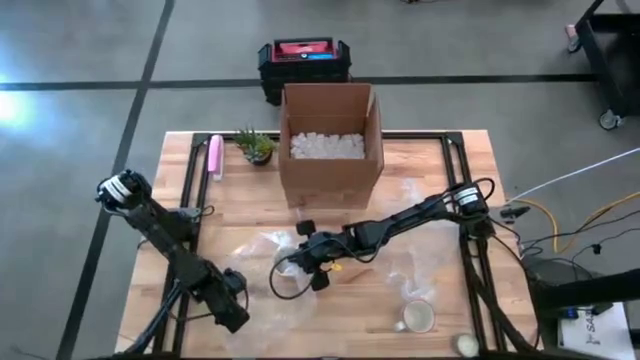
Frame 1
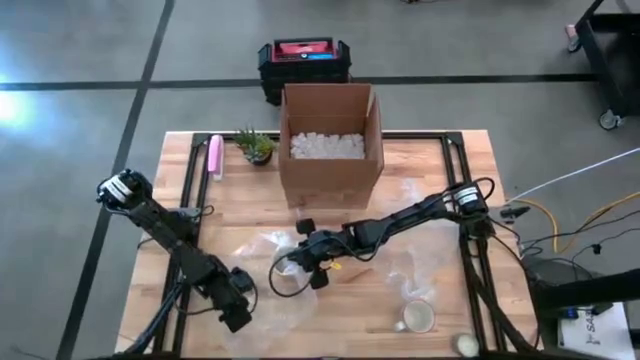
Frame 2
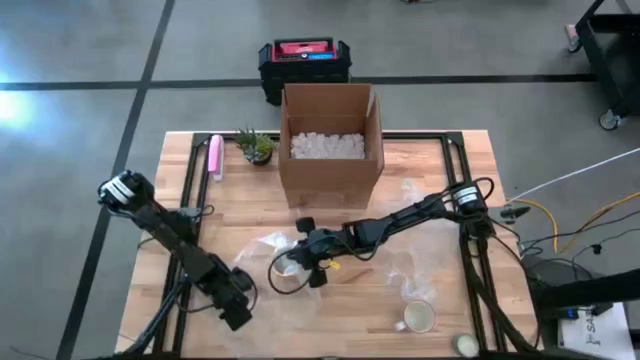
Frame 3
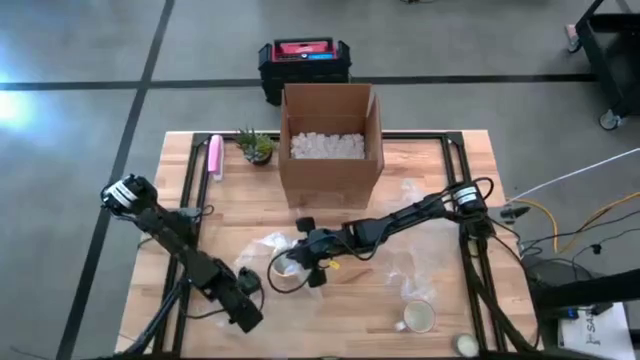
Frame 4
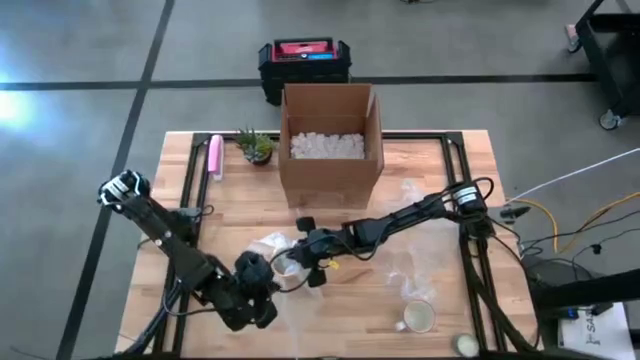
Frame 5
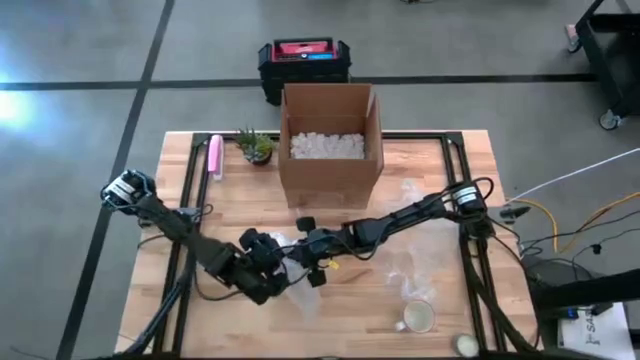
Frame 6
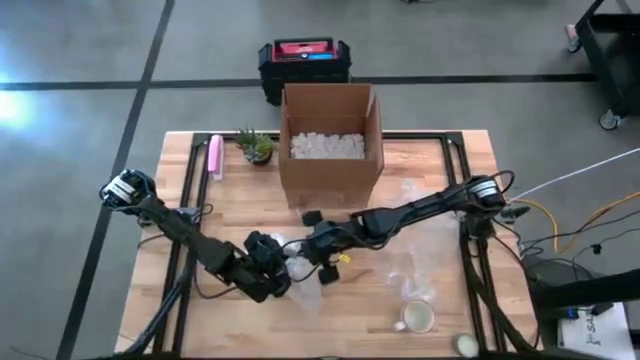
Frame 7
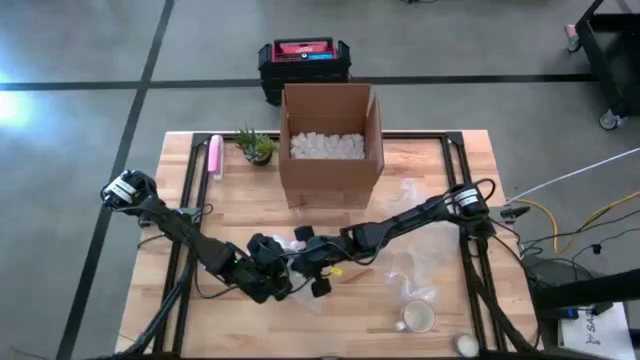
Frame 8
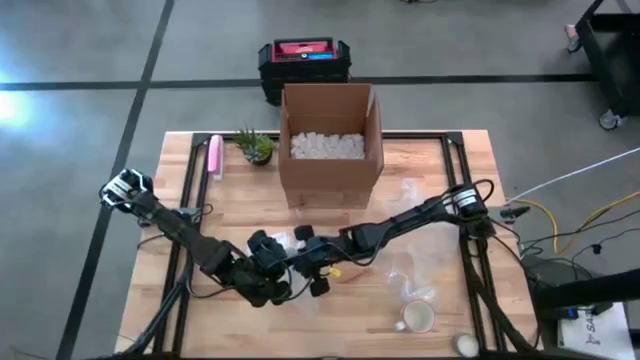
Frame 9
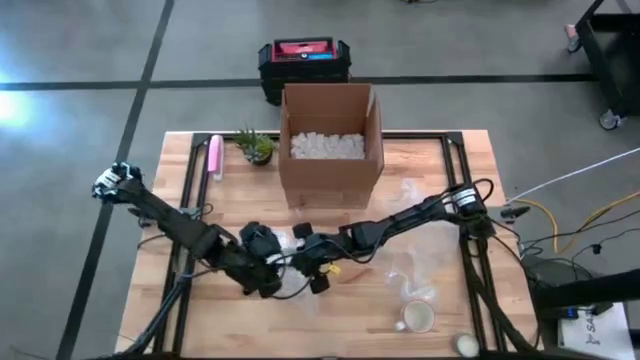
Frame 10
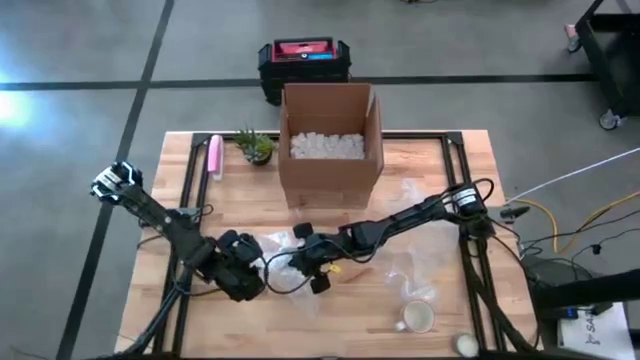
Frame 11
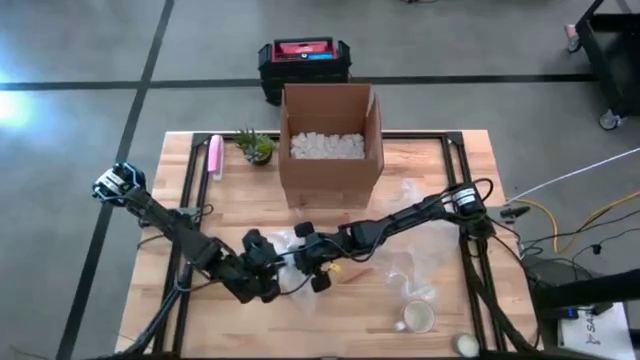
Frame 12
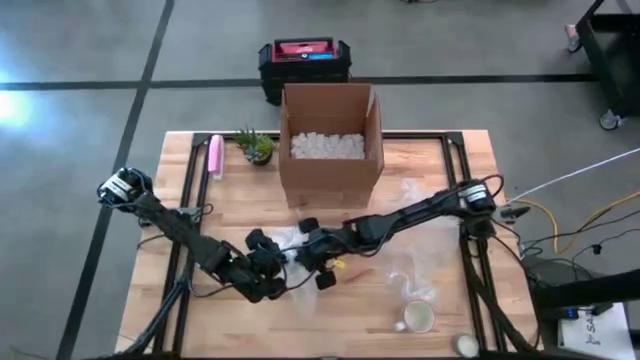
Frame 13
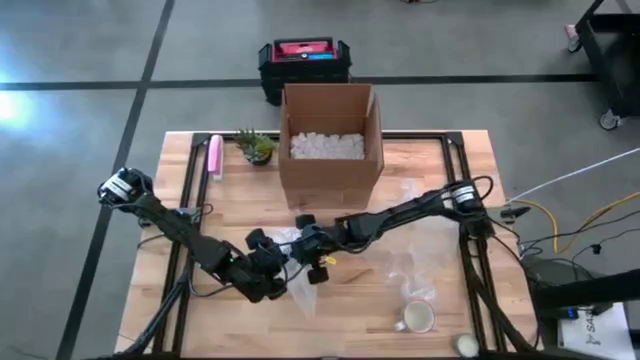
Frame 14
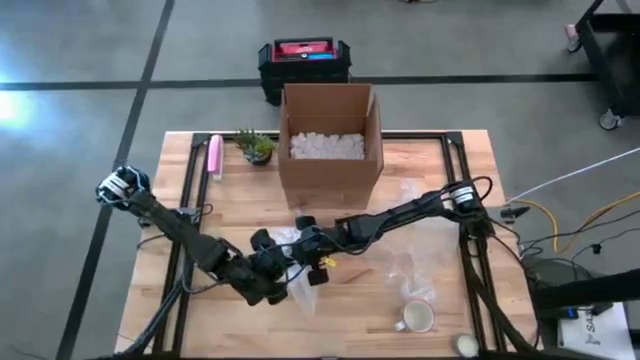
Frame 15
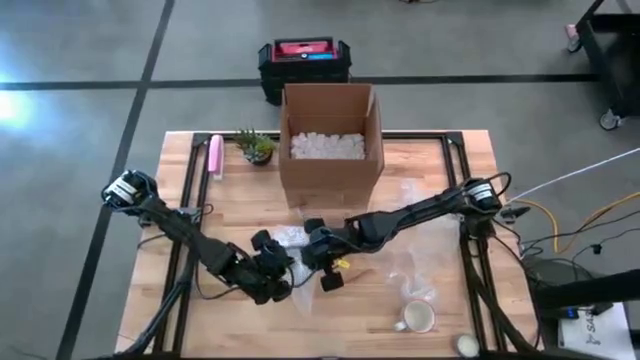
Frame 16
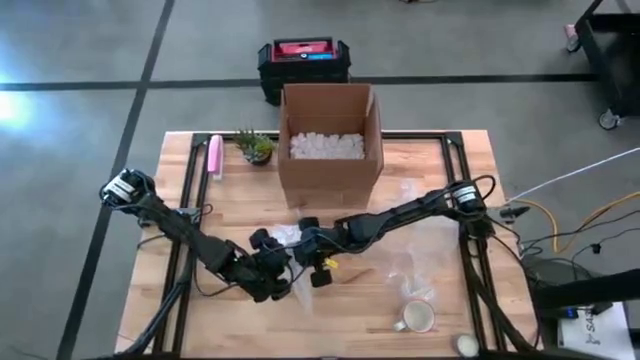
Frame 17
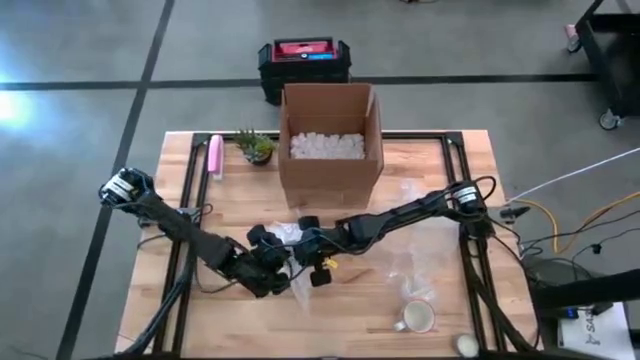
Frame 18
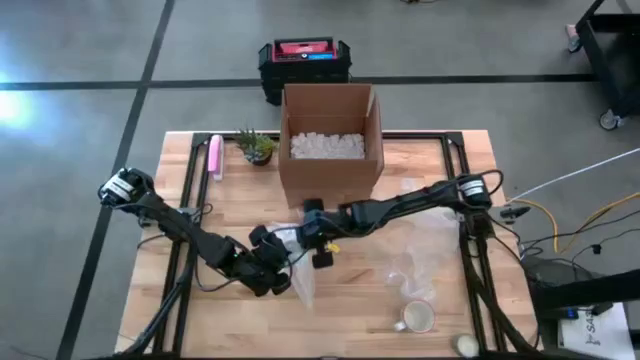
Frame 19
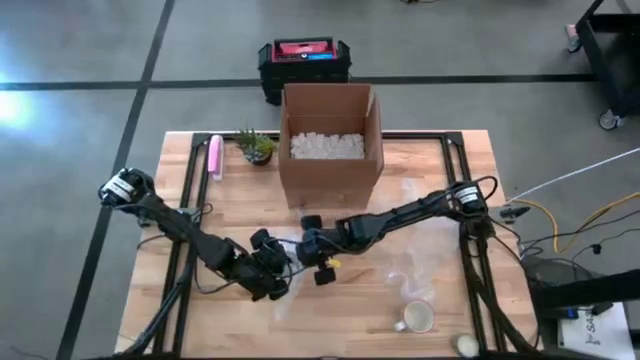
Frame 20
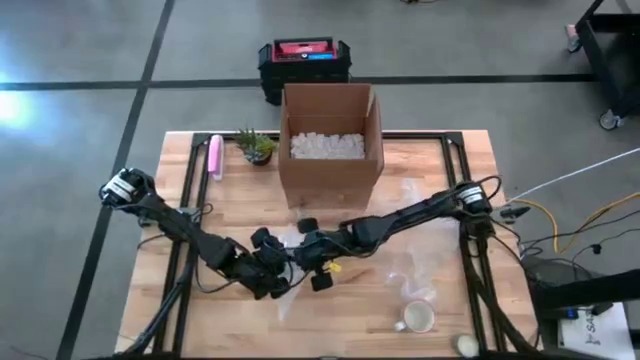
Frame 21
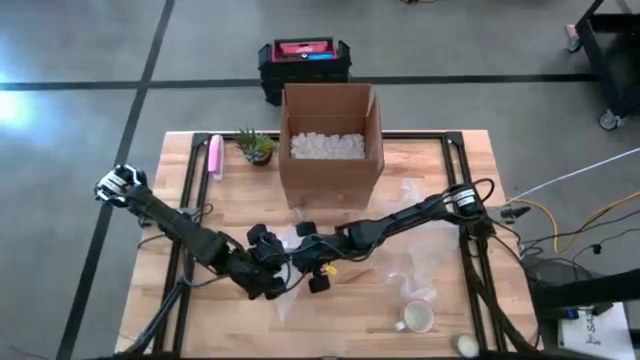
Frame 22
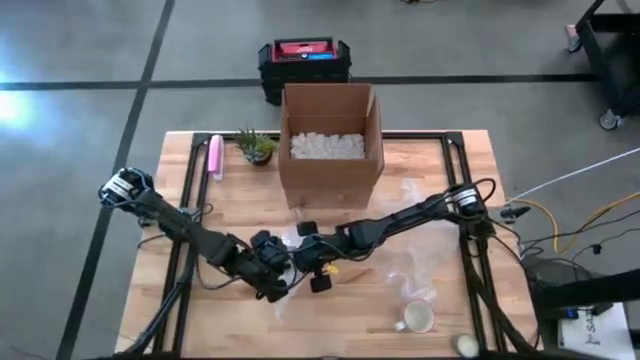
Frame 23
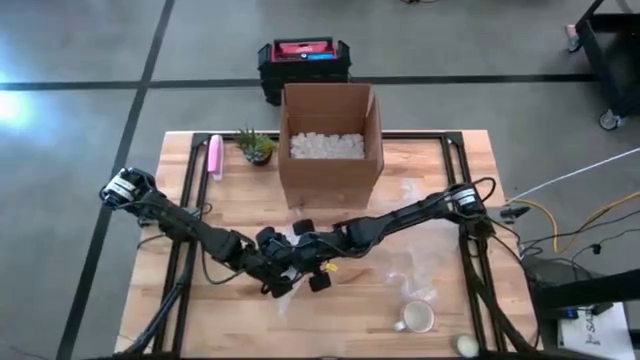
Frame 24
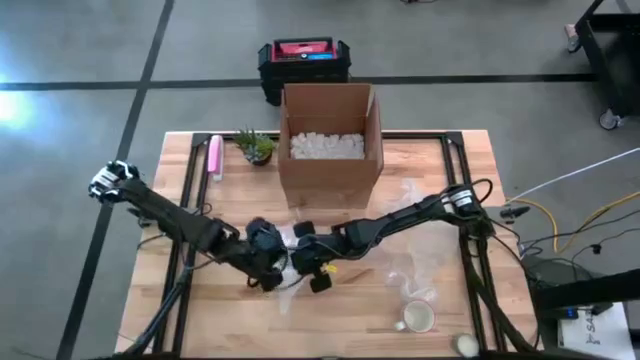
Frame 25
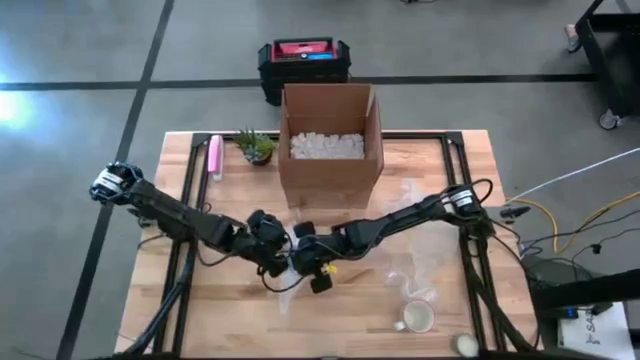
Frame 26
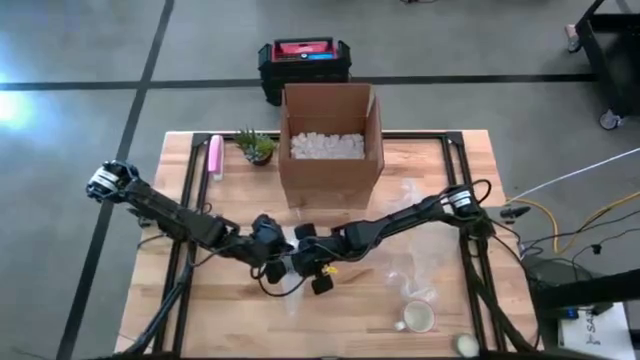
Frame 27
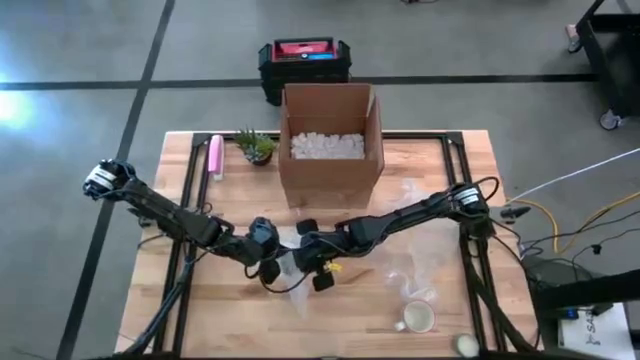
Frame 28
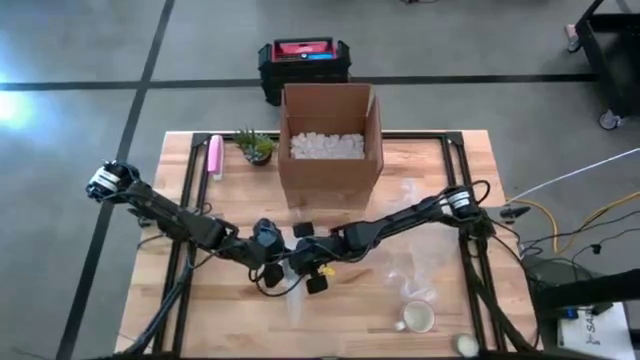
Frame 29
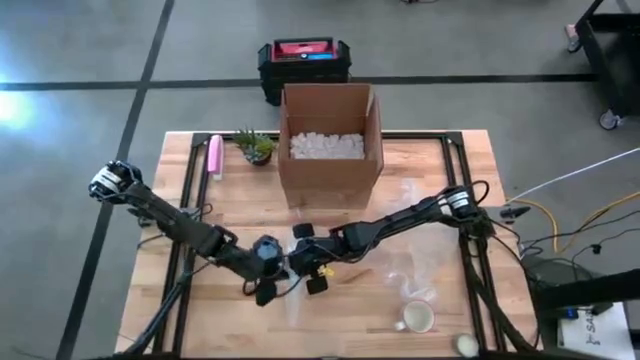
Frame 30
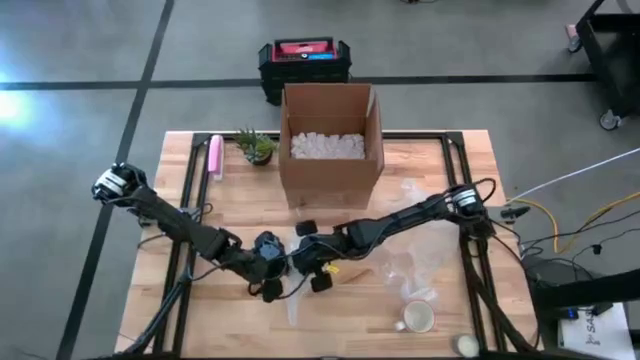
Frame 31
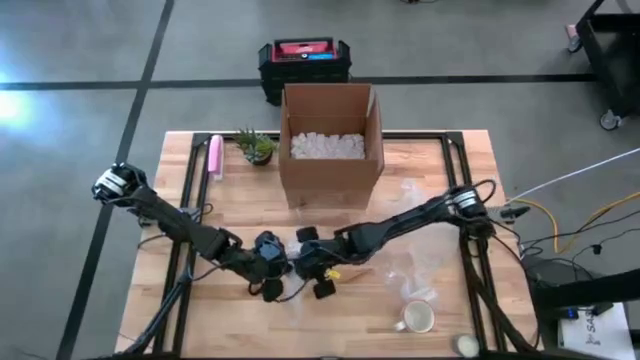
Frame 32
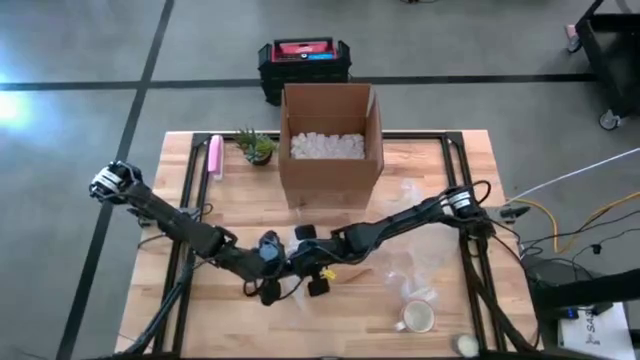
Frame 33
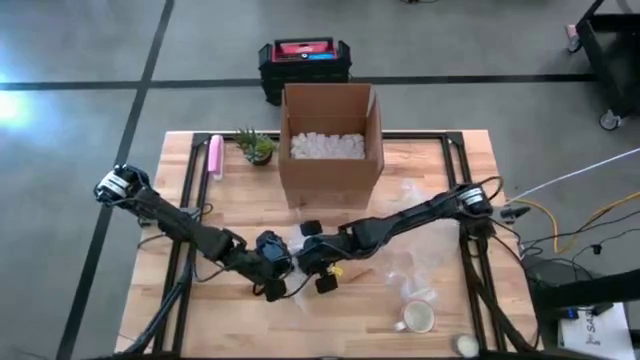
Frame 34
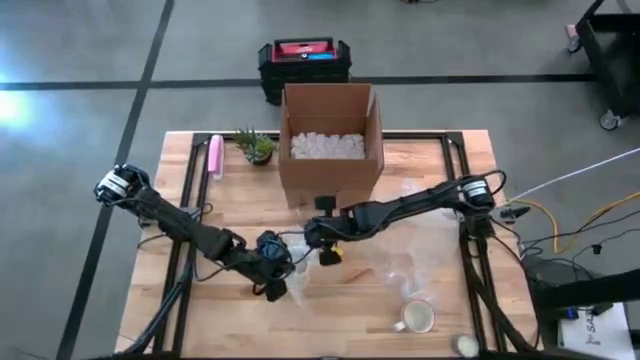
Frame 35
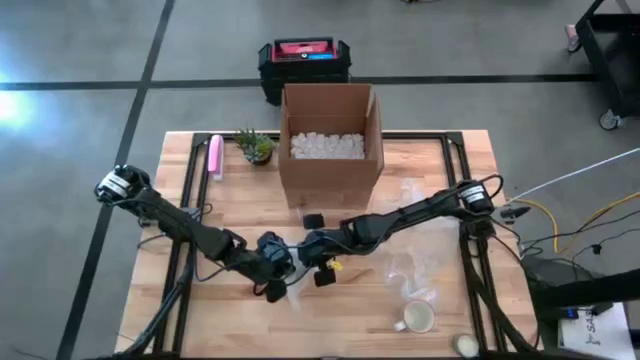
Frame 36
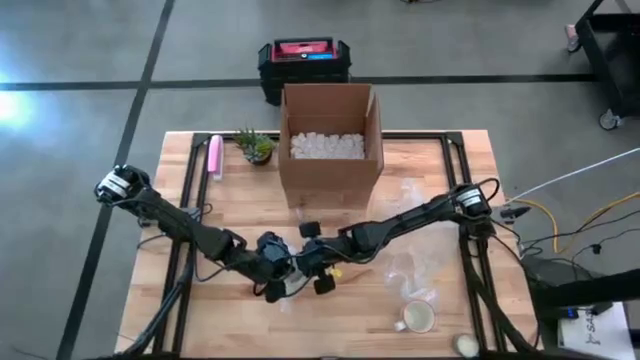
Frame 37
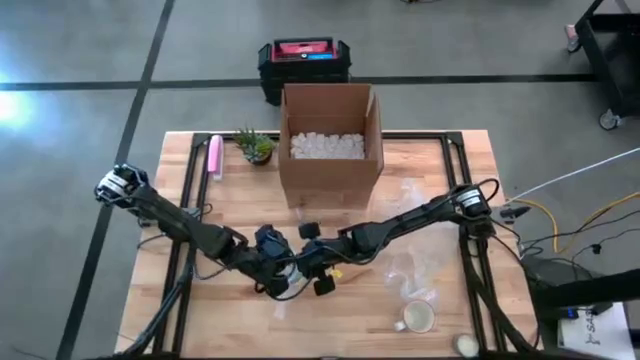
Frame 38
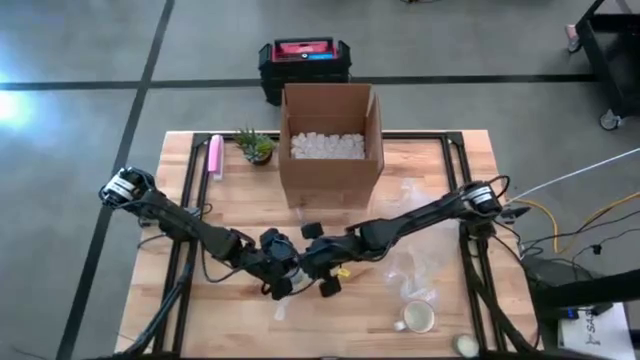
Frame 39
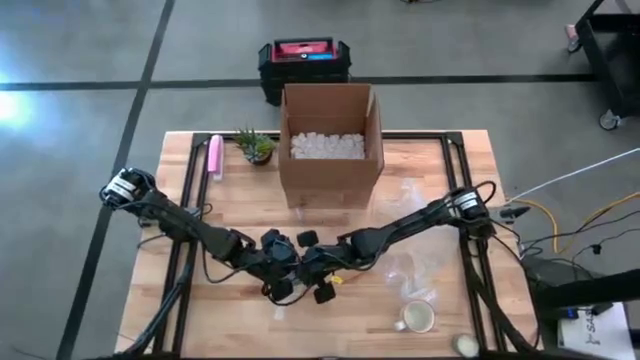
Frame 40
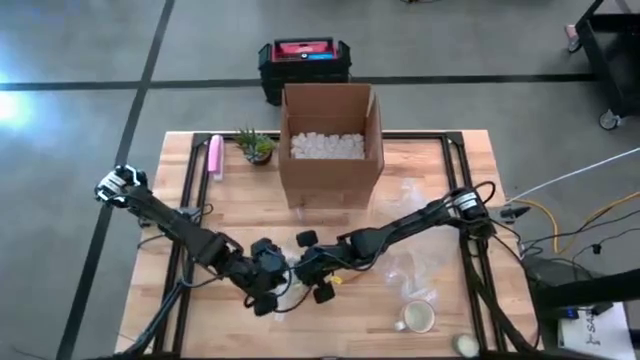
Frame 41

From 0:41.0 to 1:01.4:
Task: wrap mug
Wrap the orange mug with the bubble wrap
